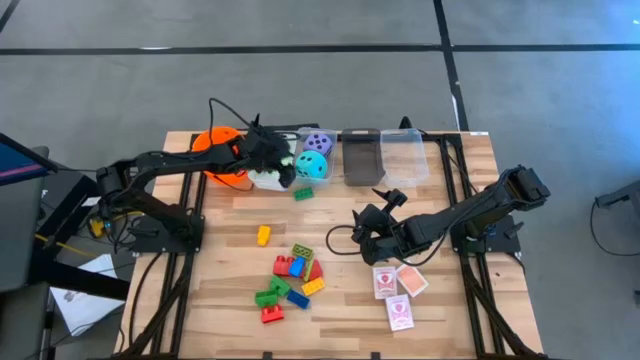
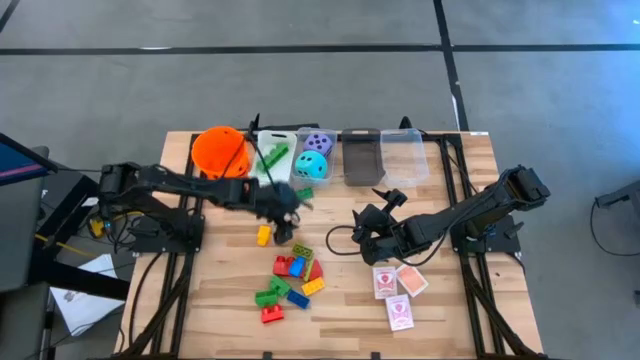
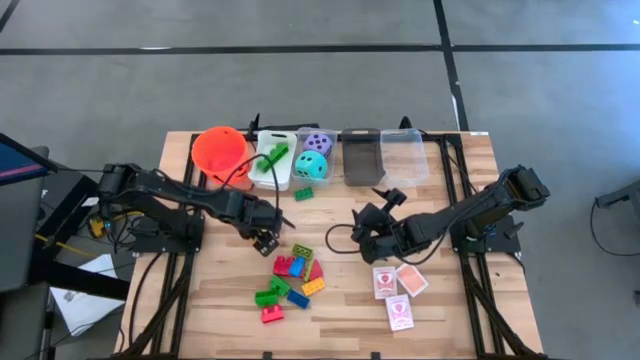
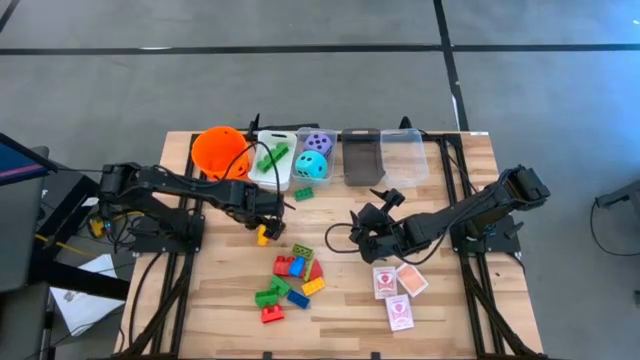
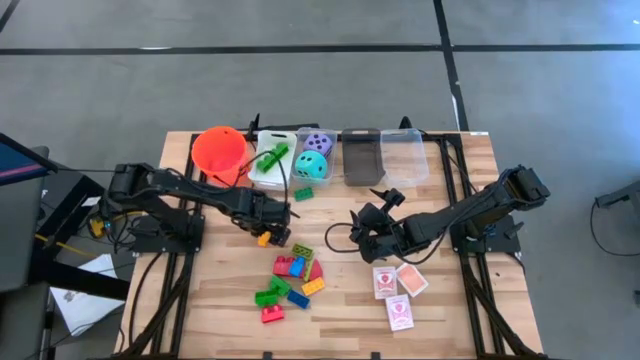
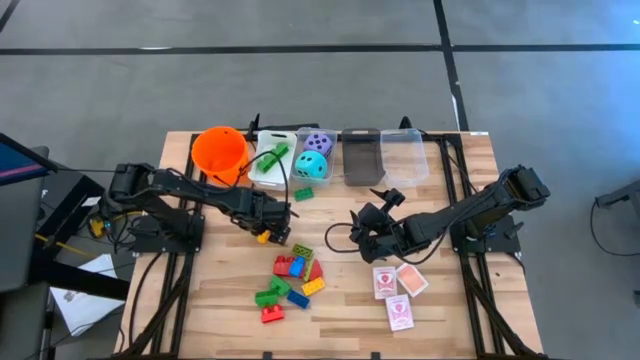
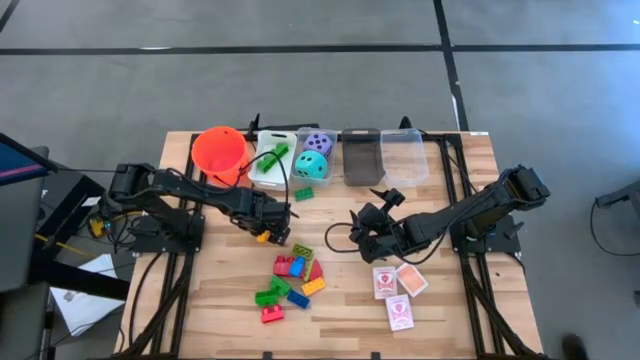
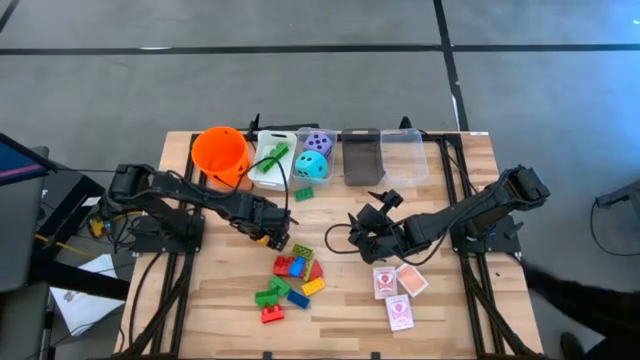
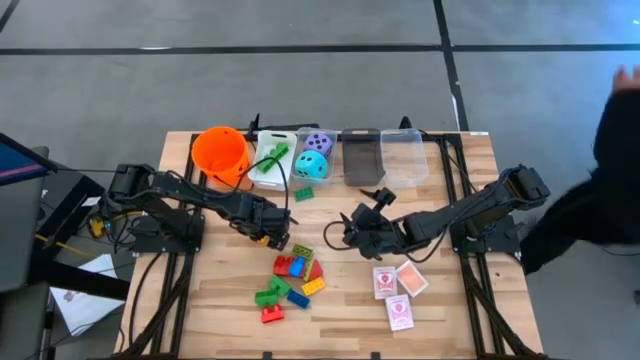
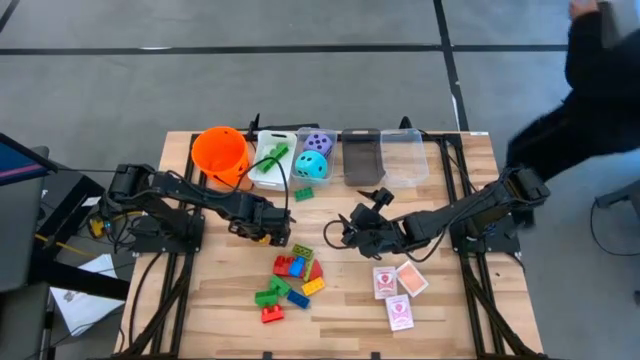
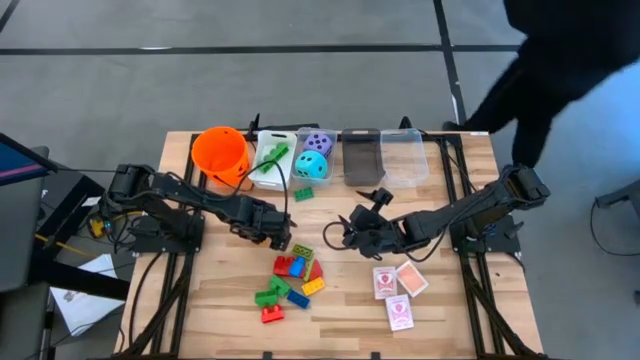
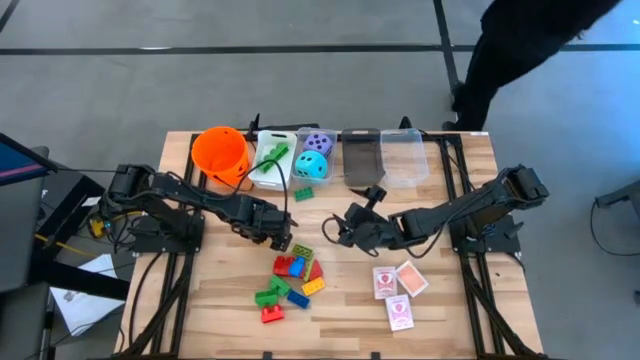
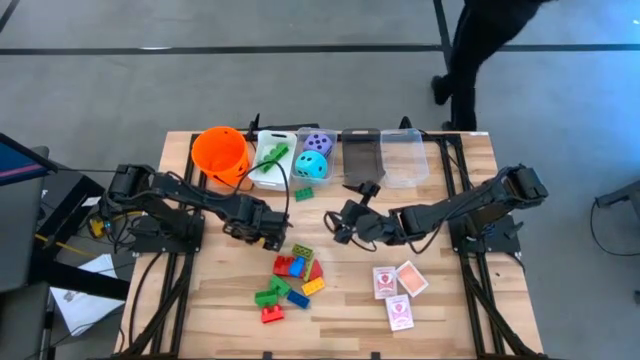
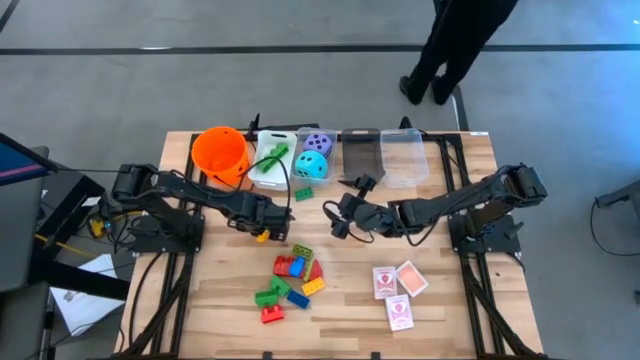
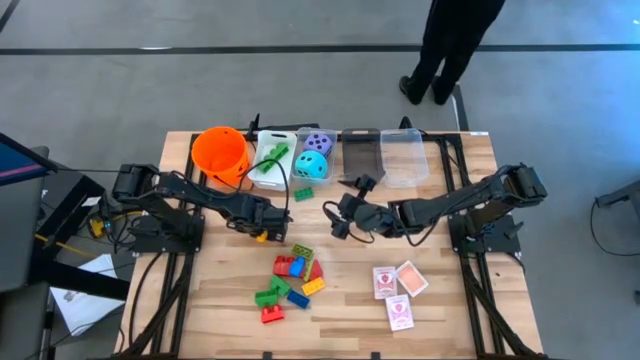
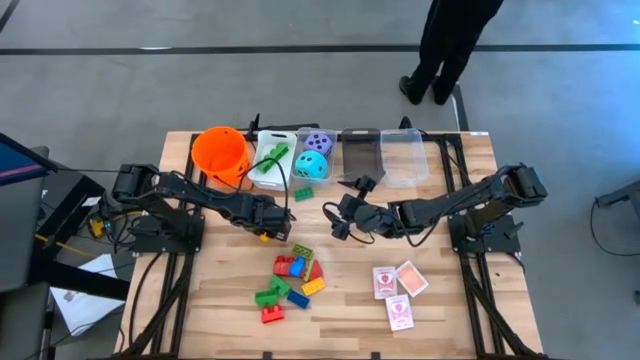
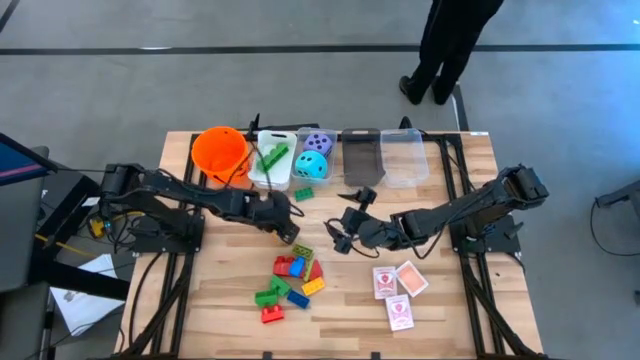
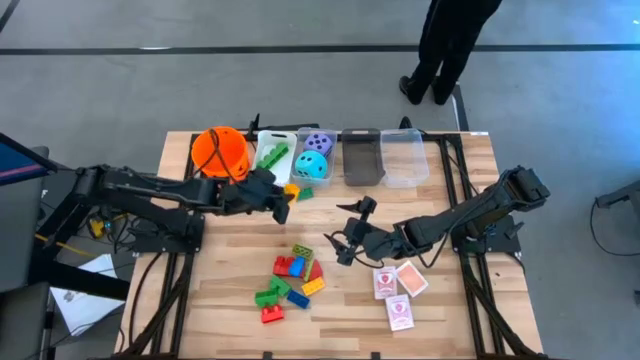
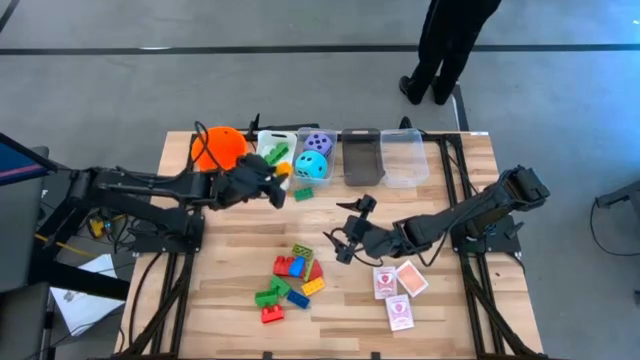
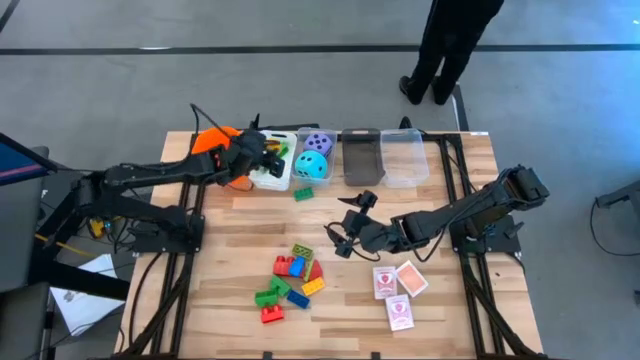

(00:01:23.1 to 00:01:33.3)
Task: Pick & Place Toys
Put the large yellow game piece into the white bin

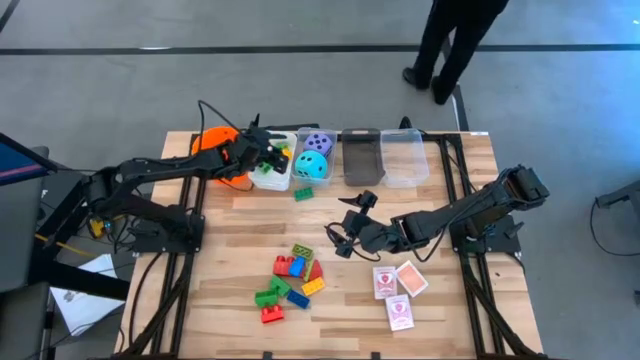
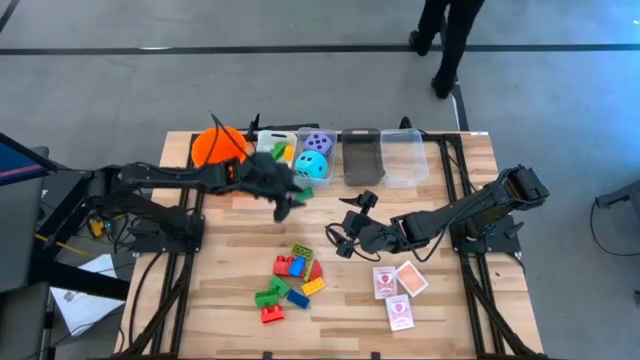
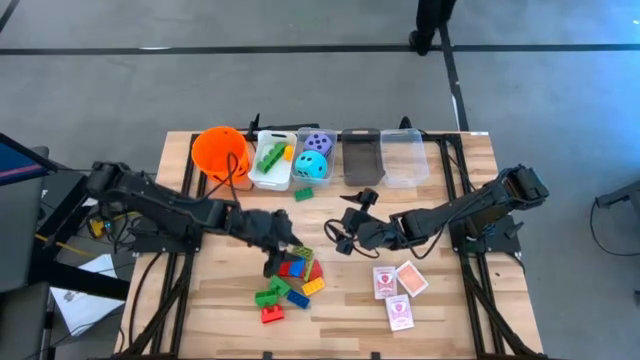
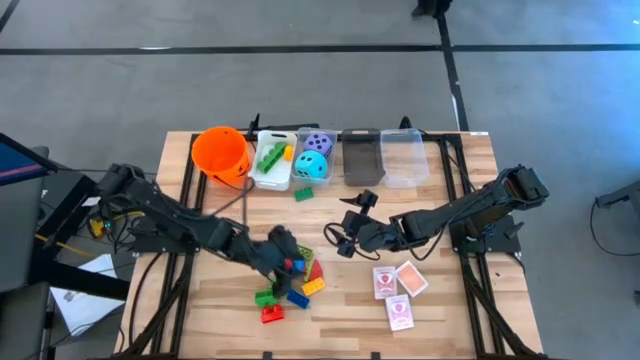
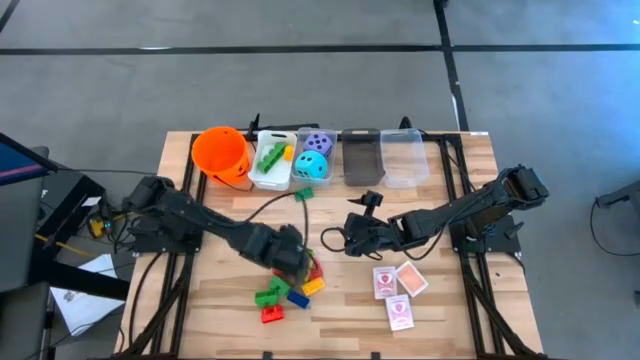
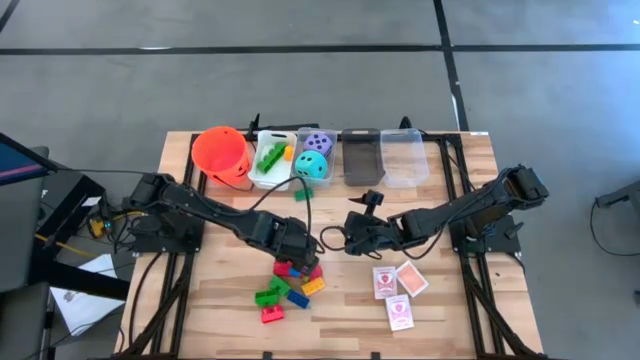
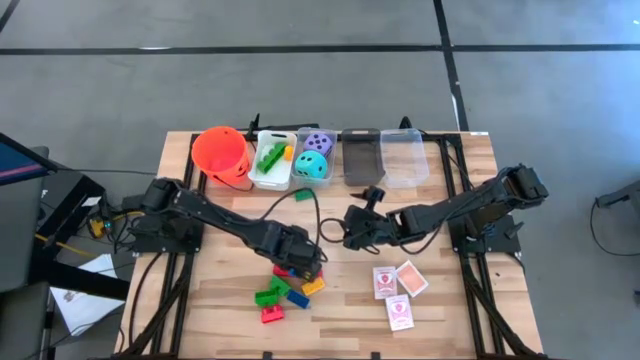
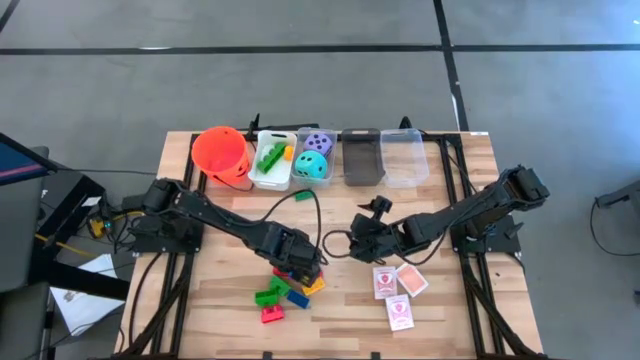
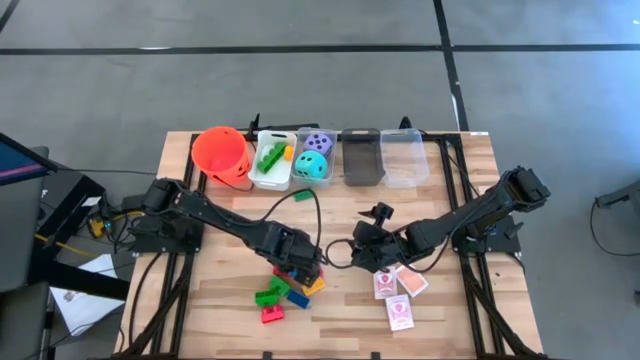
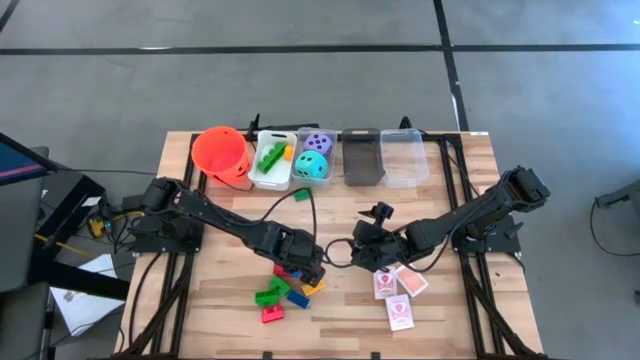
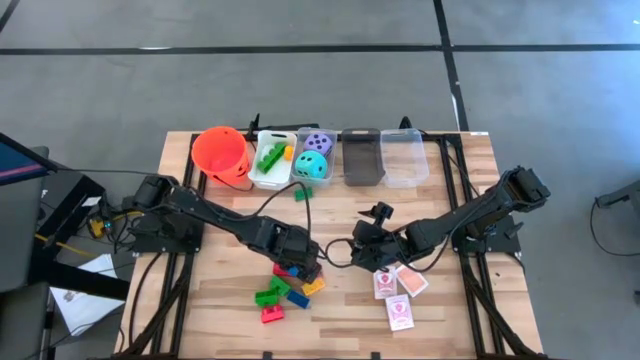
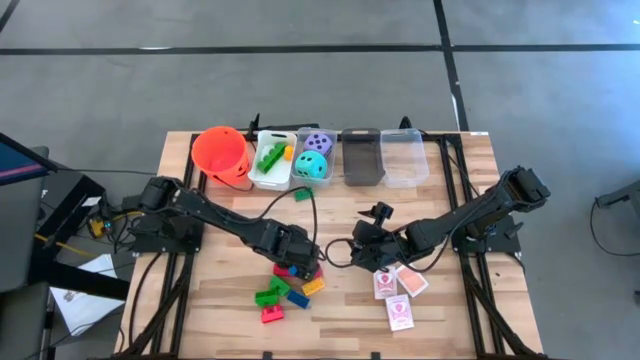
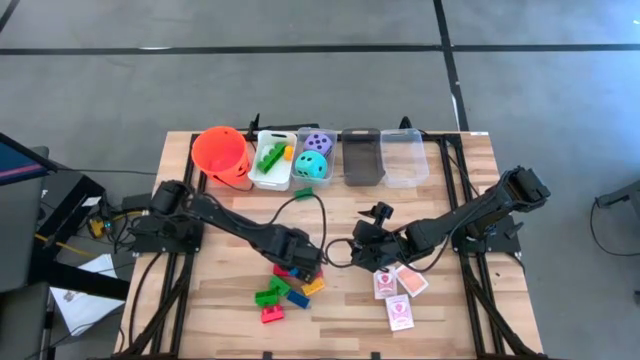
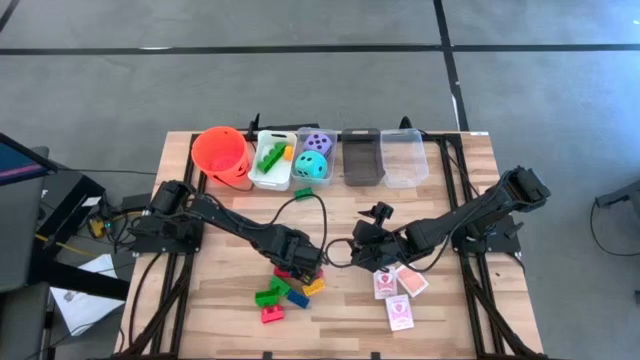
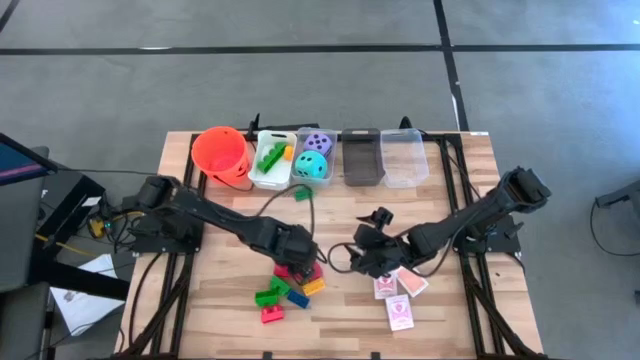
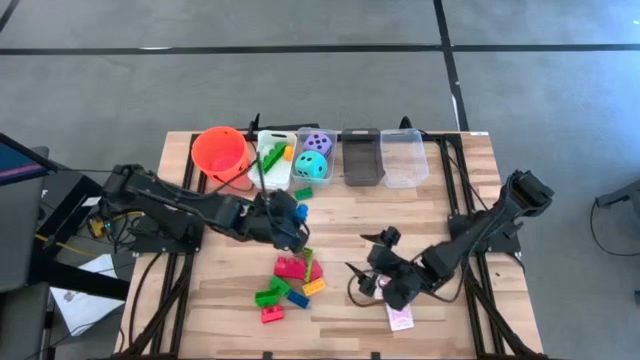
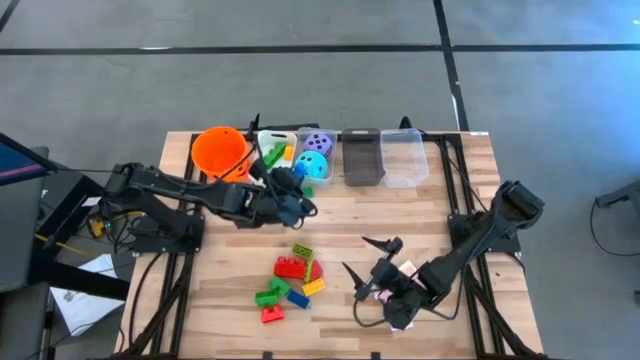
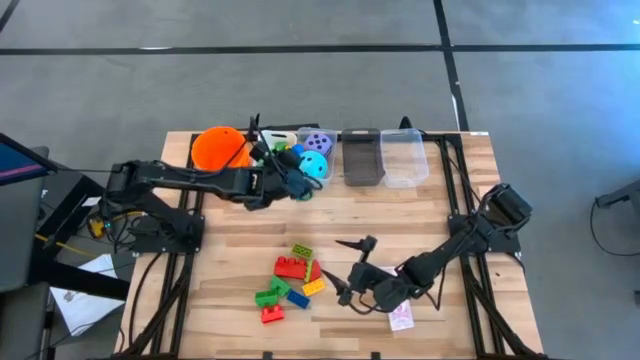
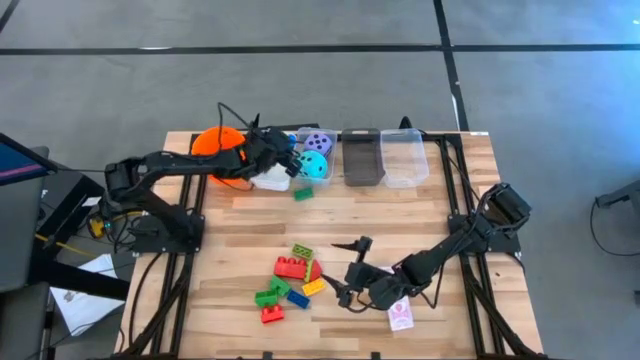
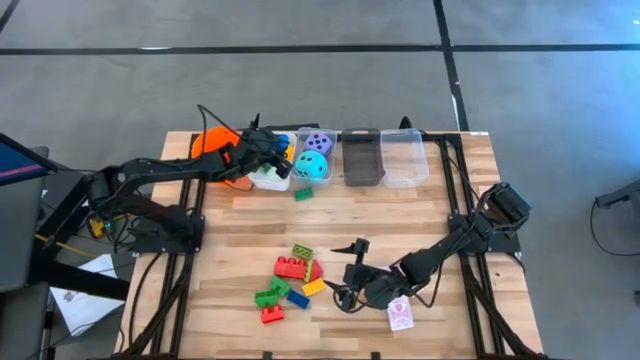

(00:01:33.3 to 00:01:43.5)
Put the large blue game piece into the white bin
